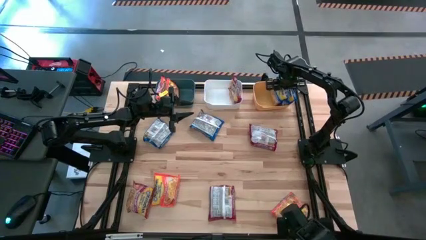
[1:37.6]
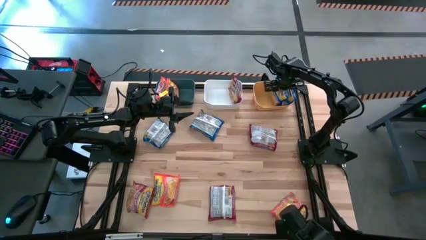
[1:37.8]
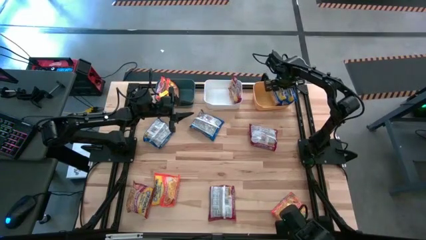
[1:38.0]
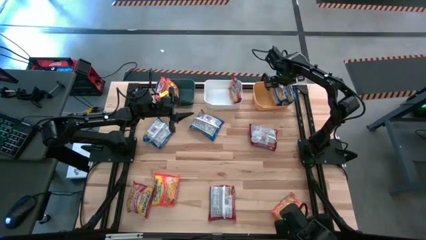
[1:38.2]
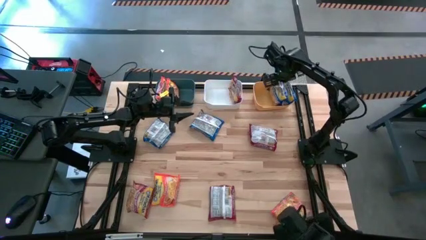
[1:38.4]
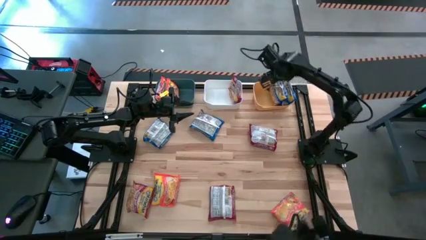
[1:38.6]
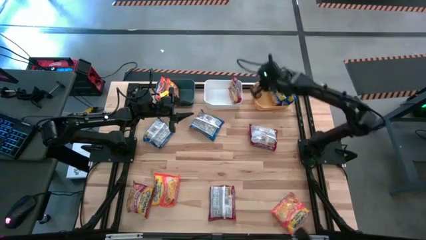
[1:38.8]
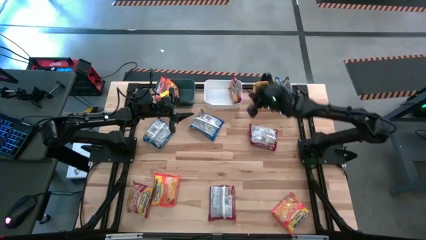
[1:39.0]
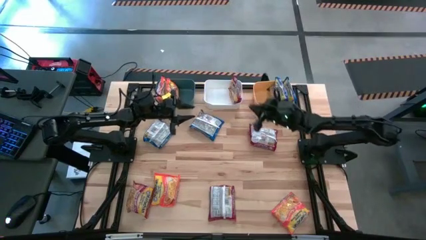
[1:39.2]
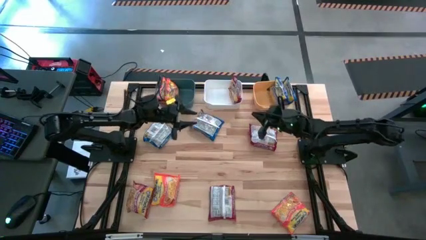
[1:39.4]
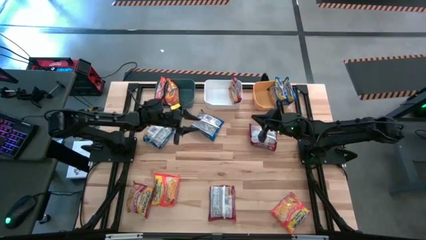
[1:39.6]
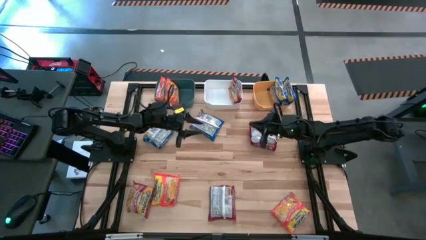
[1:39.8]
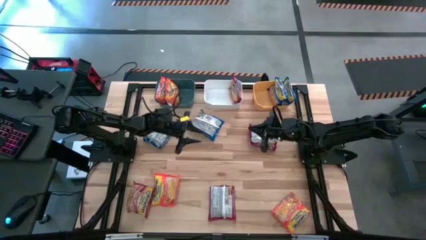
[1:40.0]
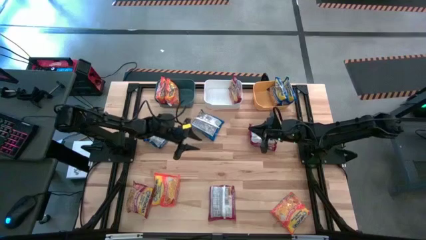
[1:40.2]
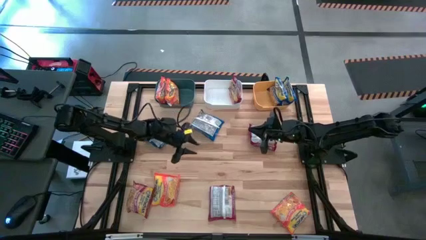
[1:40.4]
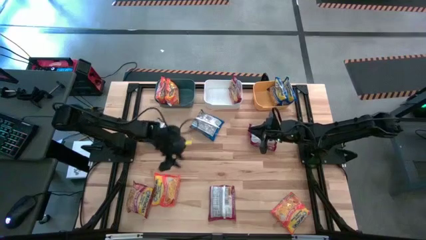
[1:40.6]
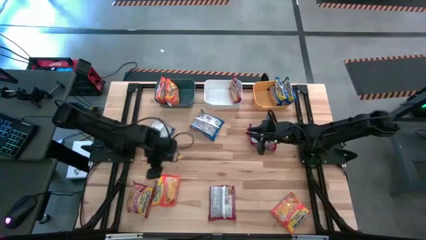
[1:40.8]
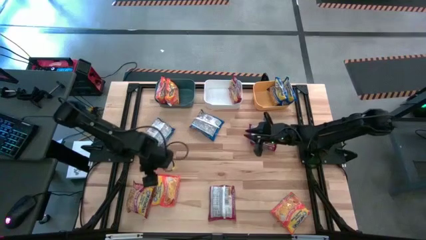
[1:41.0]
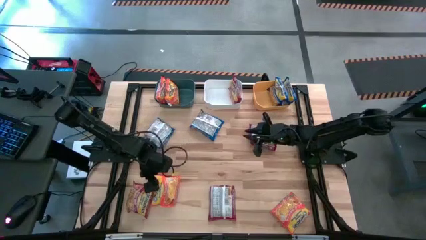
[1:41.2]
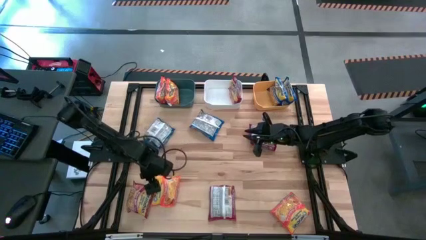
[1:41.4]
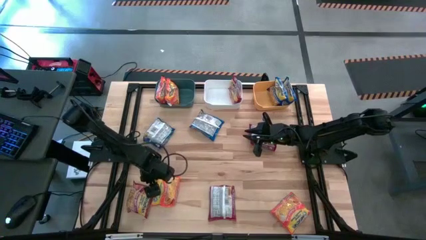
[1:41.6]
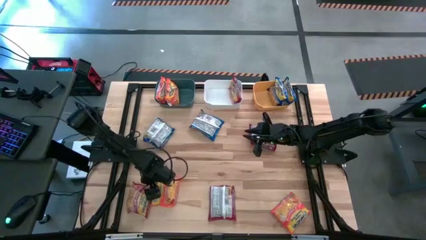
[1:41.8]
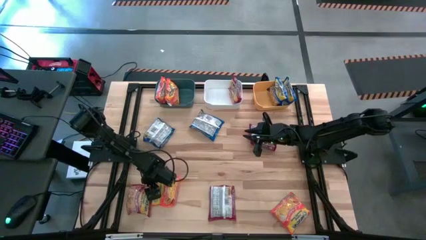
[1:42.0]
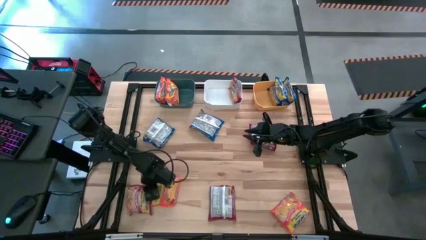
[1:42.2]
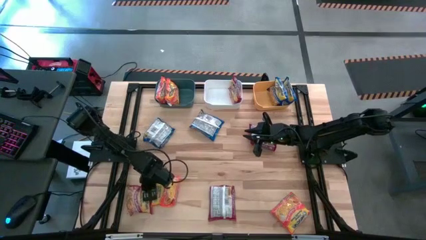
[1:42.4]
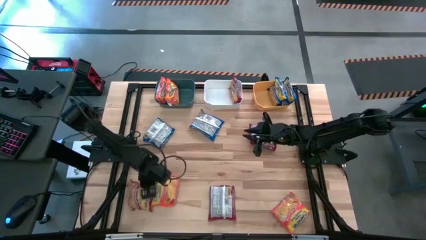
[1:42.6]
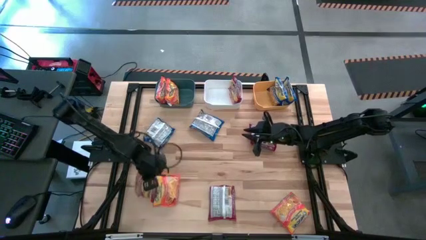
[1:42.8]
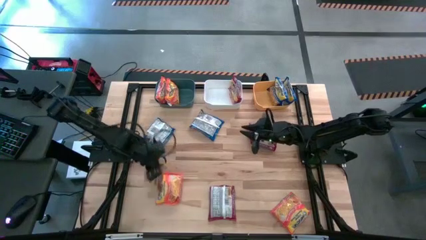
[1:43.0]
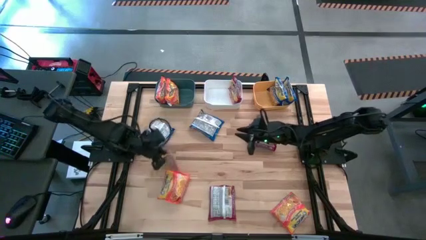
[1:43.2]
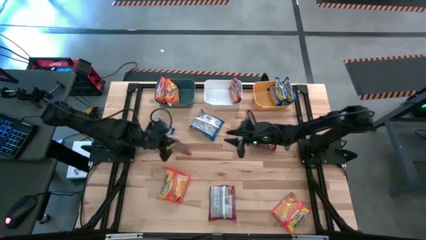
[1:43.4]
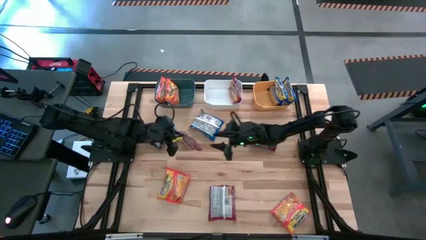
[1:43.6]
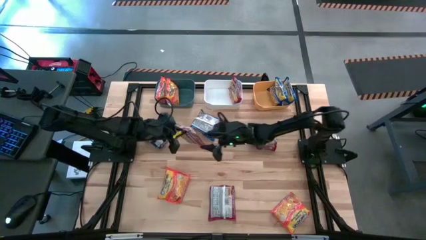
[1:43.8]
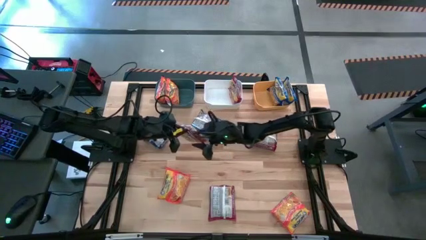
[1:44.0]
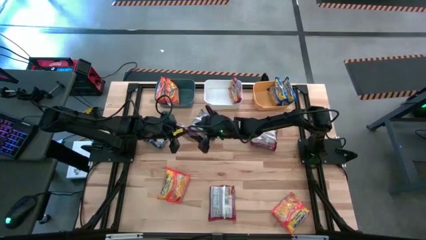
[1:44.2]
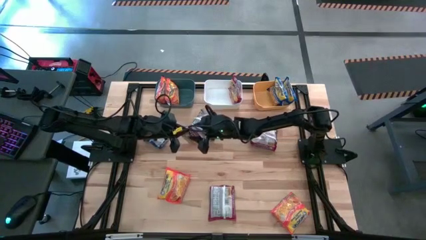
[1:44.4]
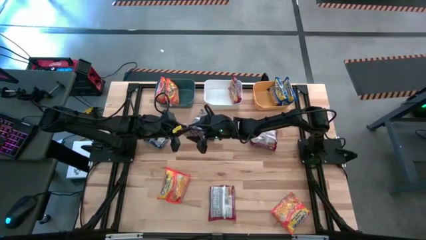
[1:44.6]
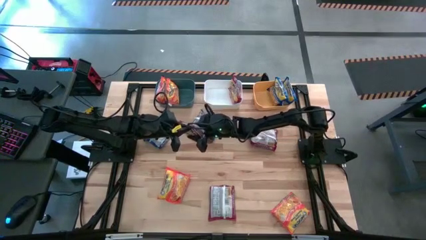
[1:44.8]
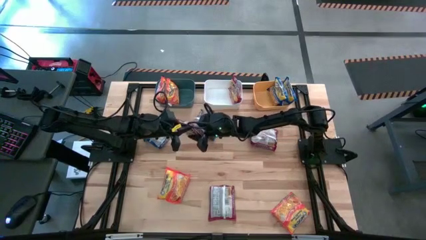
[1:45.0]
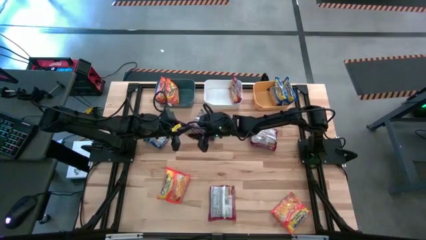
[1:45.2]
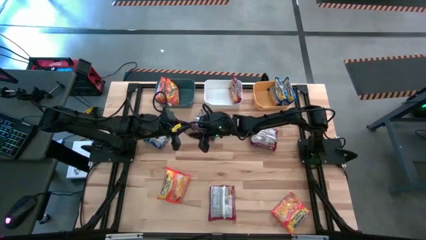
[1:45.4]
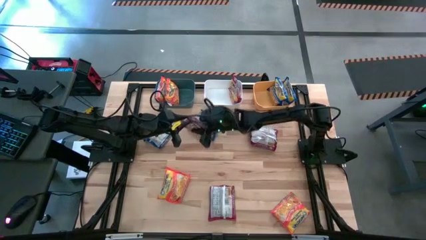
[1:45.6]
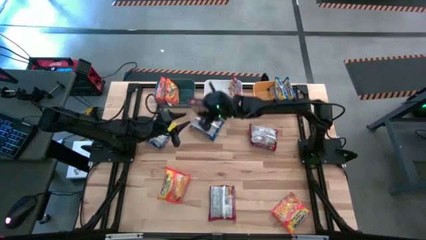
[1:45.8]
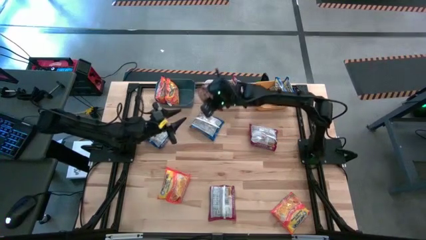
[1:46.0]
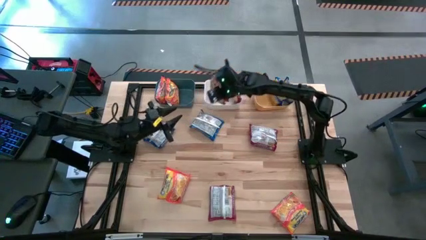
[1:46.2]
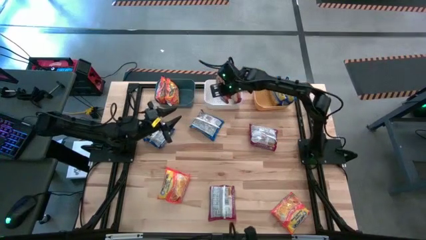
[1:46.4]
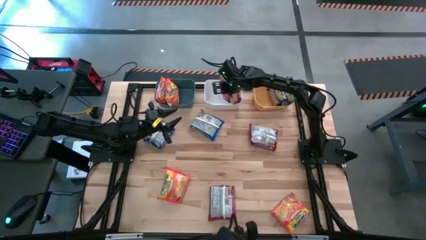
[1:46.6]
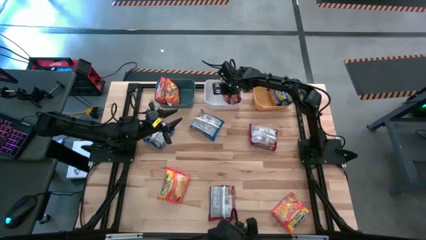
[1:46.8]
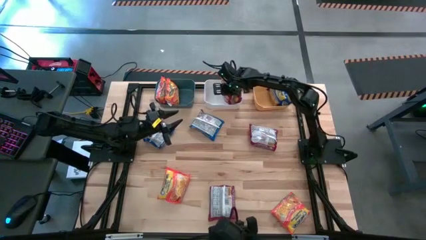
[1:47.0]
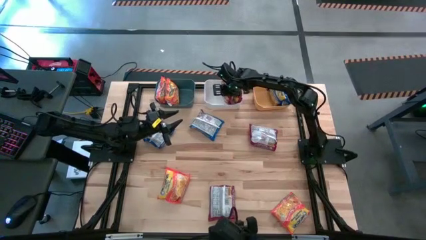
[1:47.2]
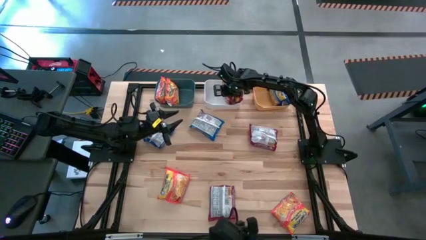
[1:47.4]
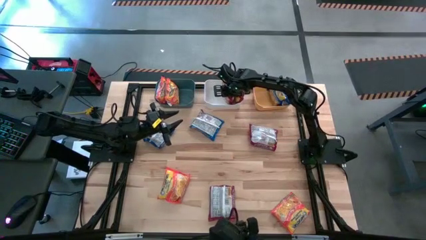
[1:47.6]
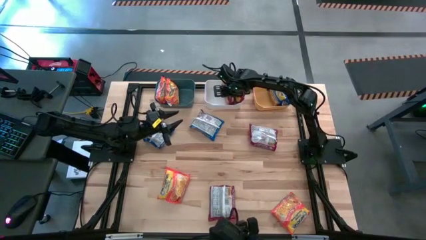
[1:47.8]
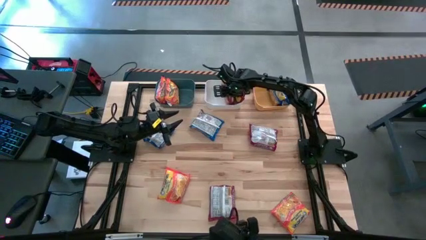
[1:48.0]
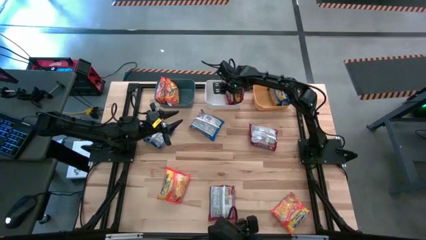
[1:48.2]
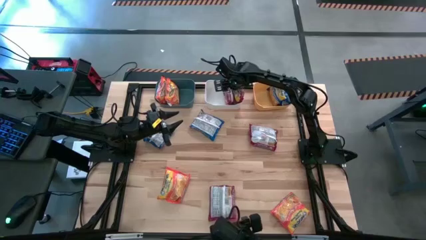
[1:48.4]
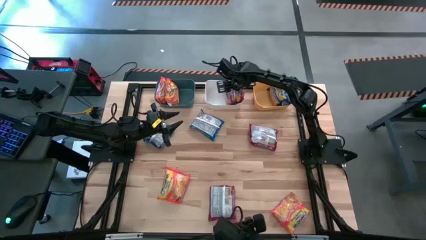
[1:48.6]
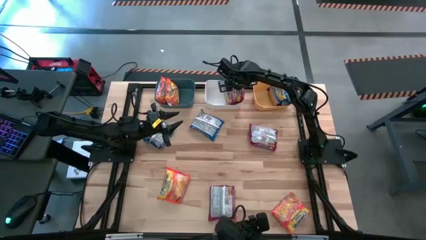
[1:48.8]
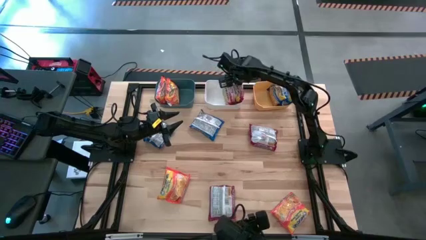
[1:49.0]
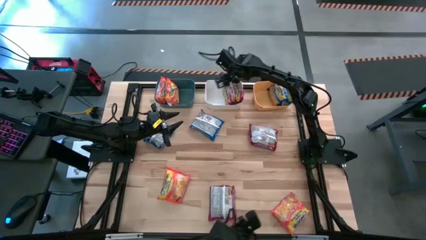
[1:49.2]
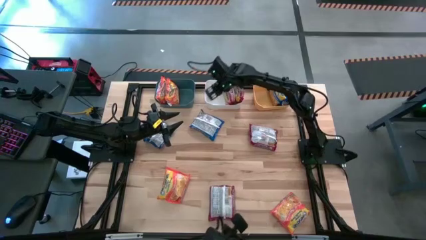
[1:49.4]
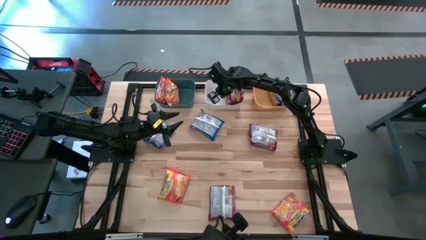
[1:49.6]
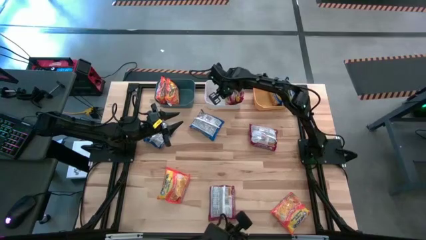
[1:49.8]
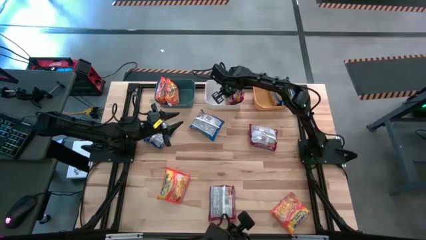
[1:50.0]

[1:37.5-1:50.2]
Task: Sort Maruchan noodles
Put the bottom left red noodle pack into the white bin

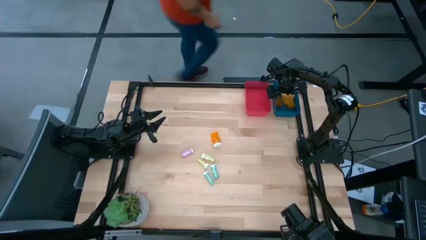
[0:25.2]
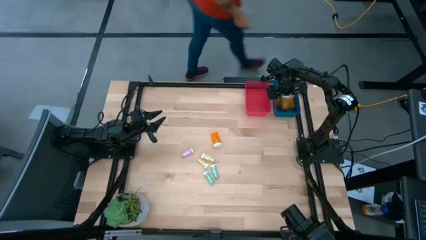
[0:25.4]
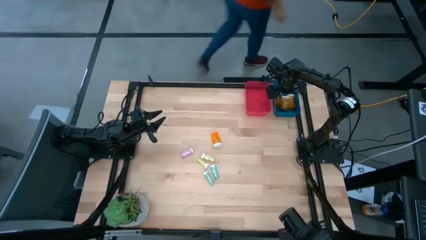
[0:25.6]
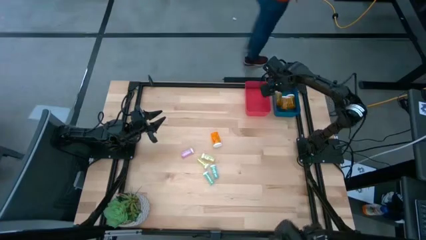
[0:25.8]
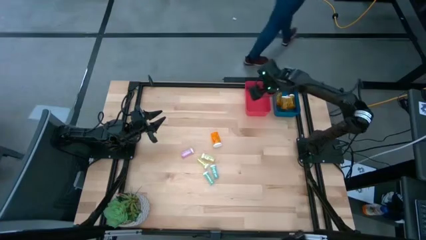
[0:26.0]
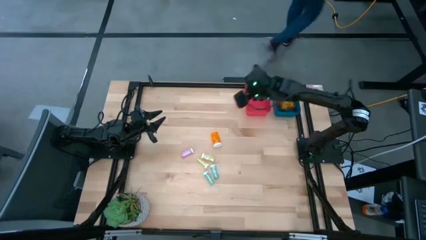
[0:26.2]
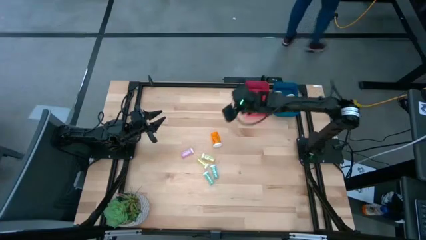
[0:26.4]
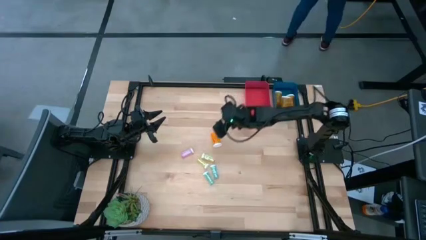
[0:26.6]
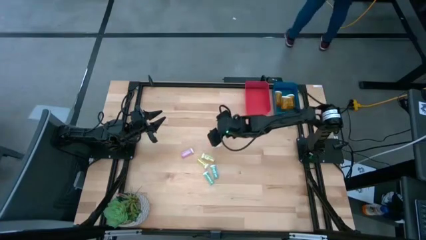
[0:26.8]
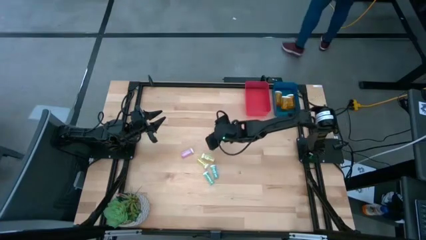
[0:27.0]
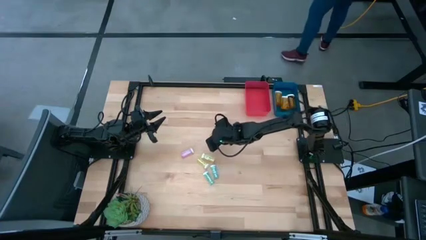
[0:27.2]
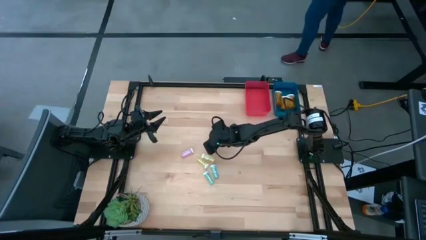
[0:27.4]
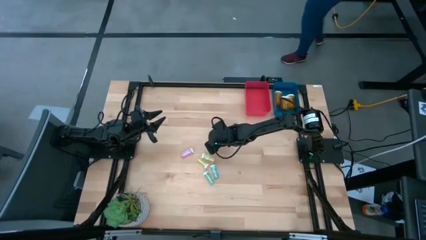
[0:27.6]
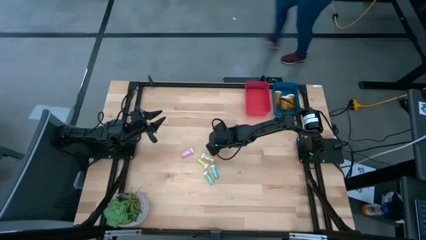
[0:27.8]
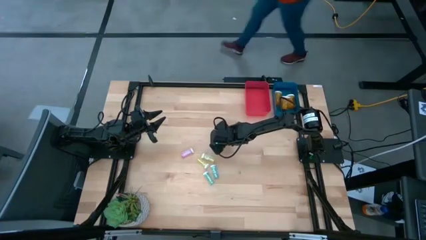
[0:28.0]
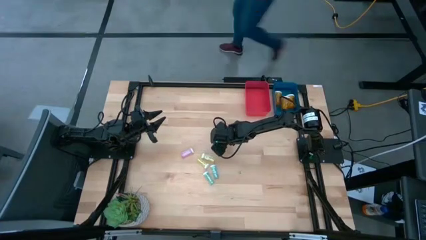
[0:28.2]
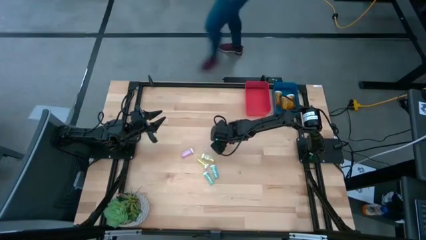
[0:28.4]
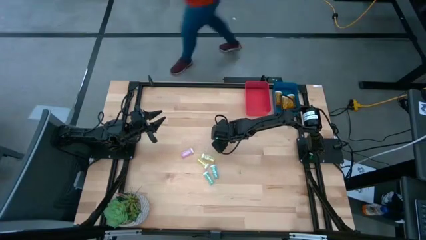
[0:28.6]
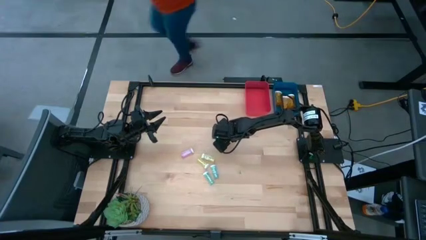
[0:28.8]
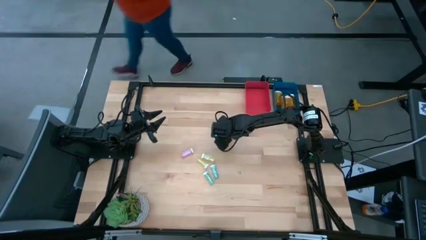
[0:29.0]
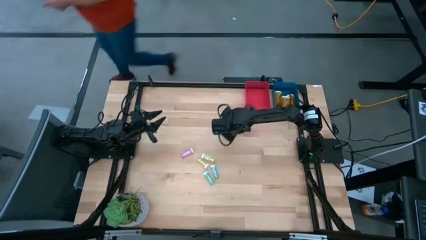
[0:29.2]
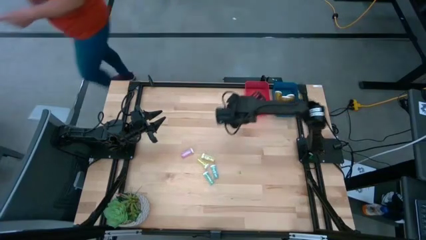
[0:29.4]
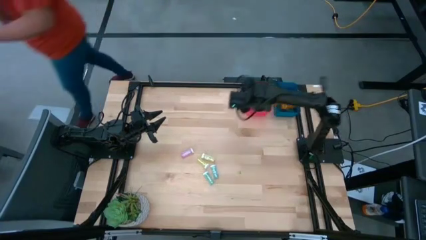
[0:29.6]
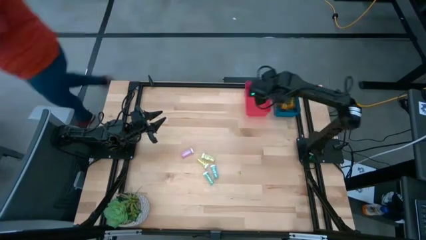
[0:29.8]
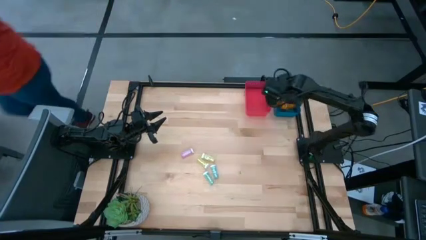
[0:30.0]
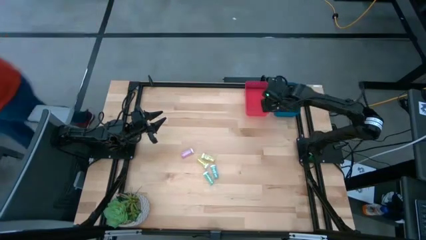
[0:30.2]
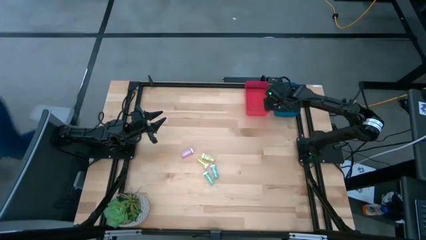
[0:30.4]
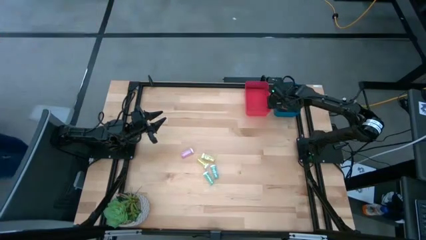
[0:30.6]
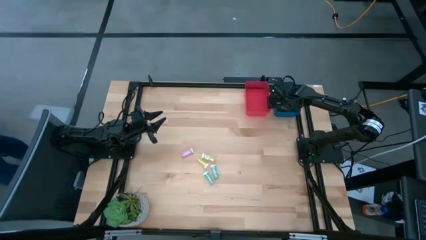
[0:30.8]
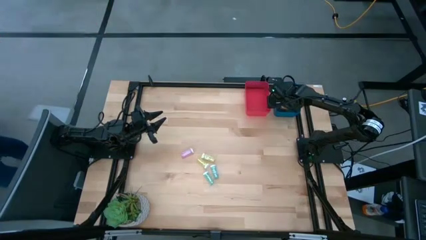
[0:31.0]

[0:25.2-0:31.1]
Task: Pick and place medicine bottles into bin by pill shape (circle, oval)
Put the orange capsule bottle into the blue bin
